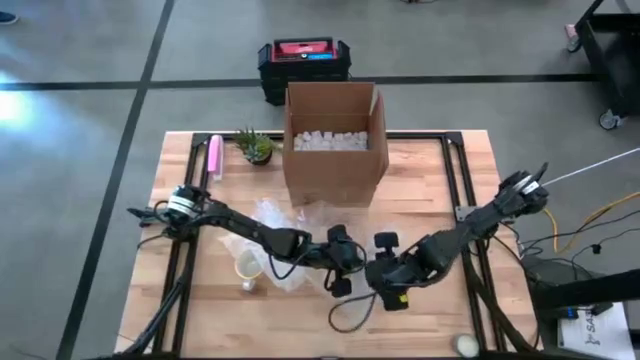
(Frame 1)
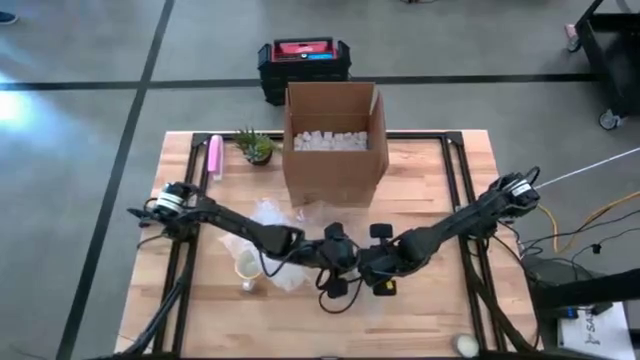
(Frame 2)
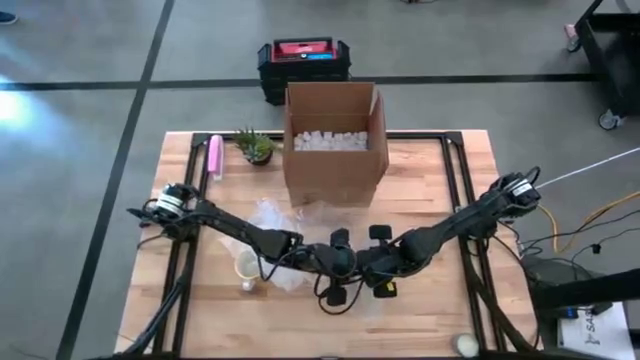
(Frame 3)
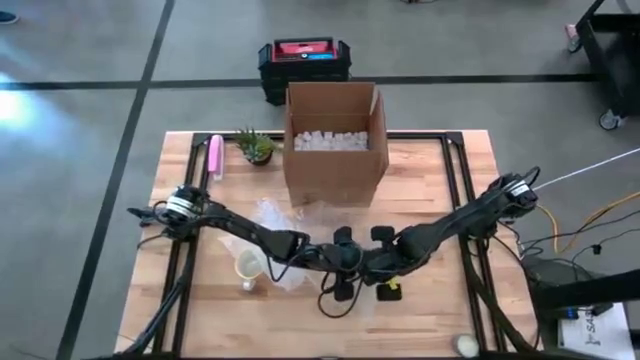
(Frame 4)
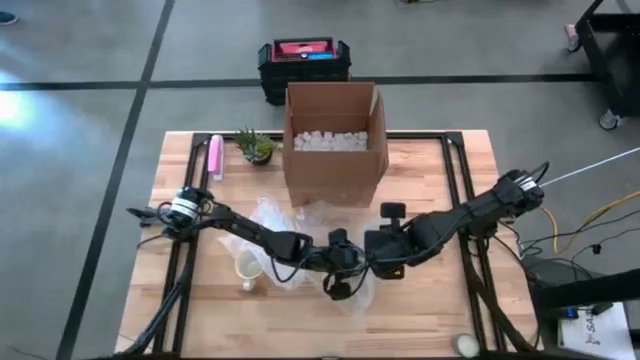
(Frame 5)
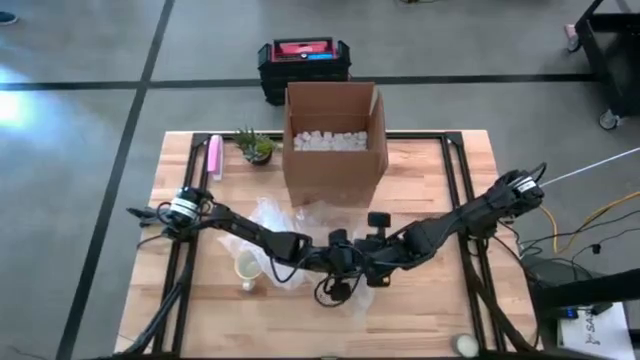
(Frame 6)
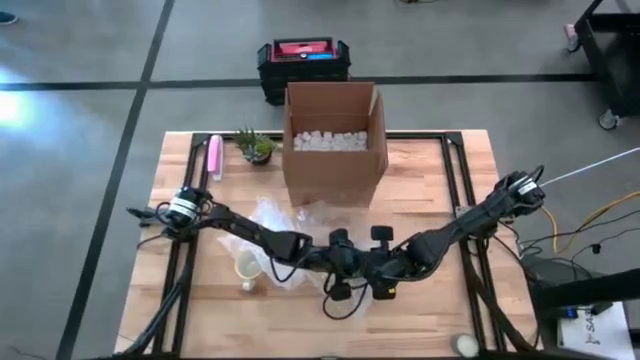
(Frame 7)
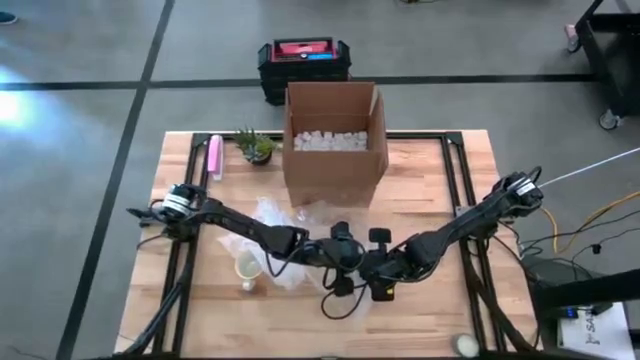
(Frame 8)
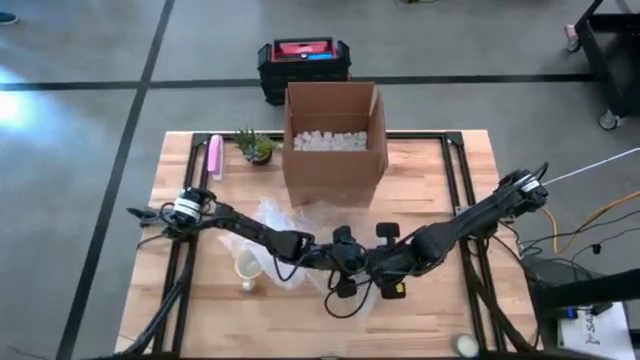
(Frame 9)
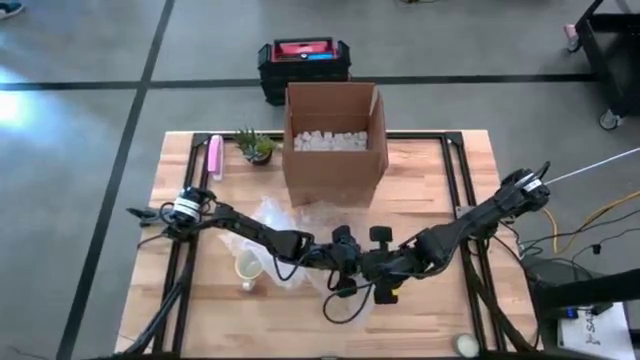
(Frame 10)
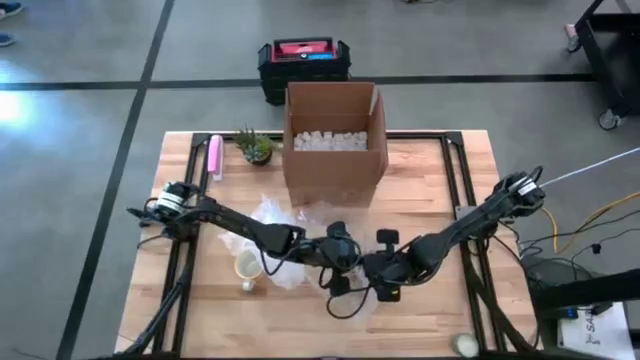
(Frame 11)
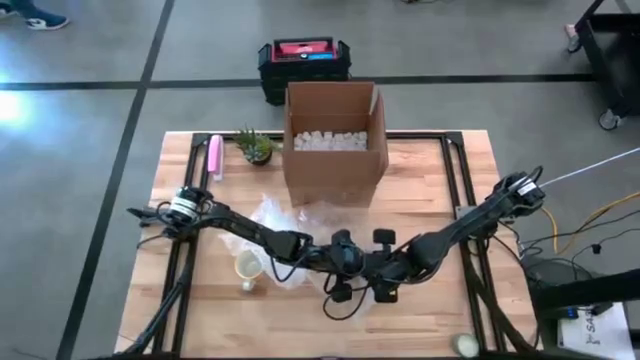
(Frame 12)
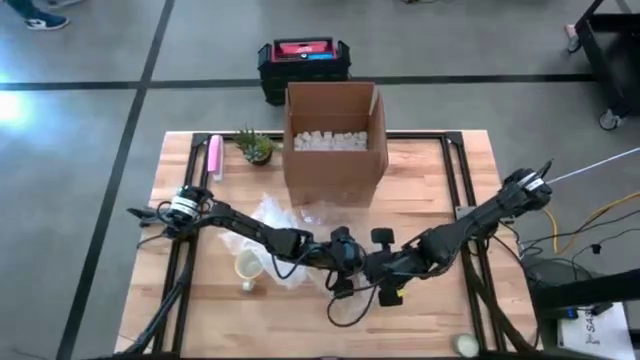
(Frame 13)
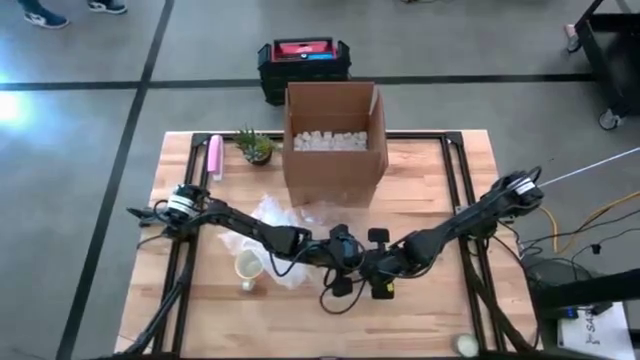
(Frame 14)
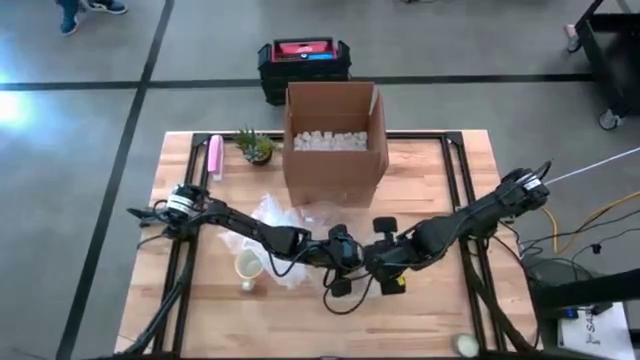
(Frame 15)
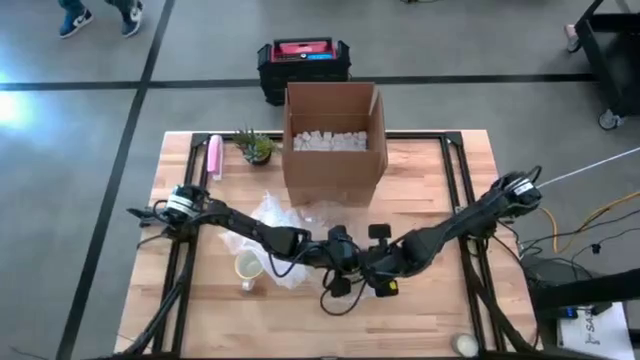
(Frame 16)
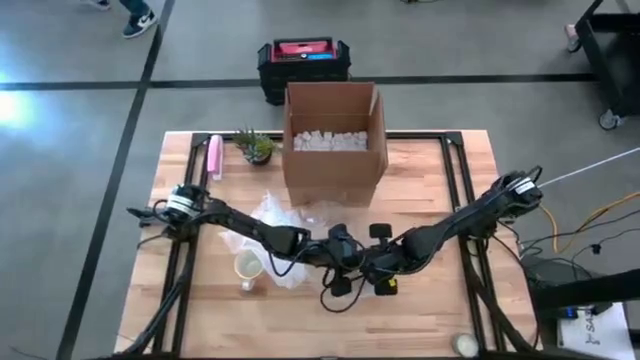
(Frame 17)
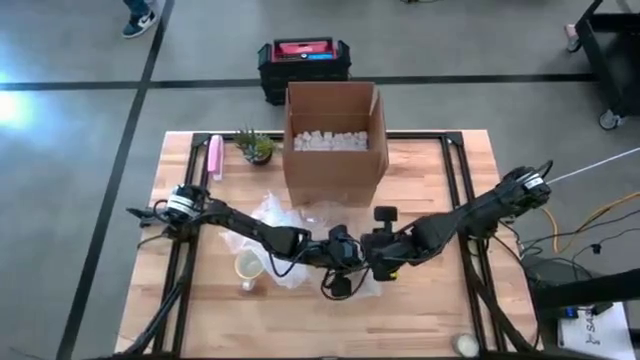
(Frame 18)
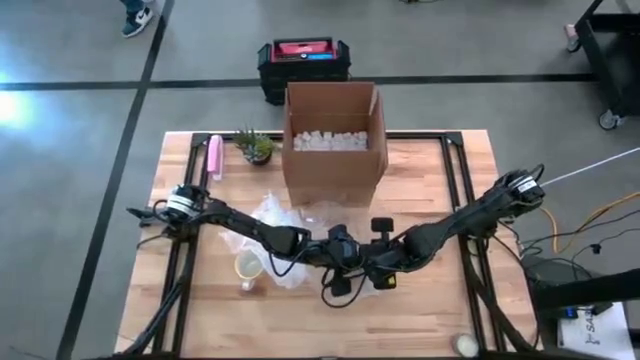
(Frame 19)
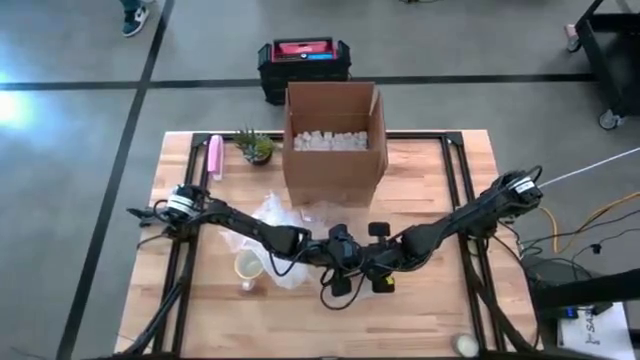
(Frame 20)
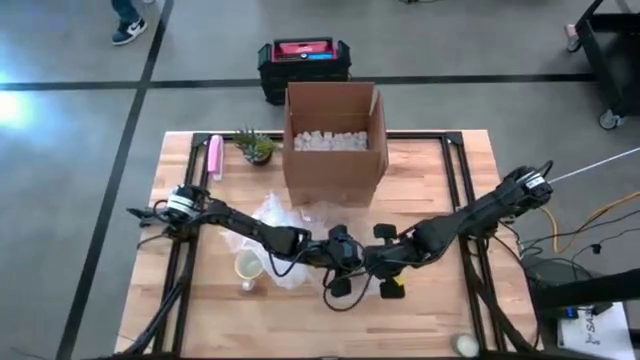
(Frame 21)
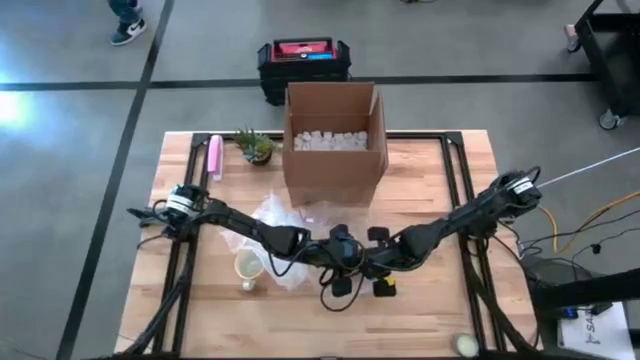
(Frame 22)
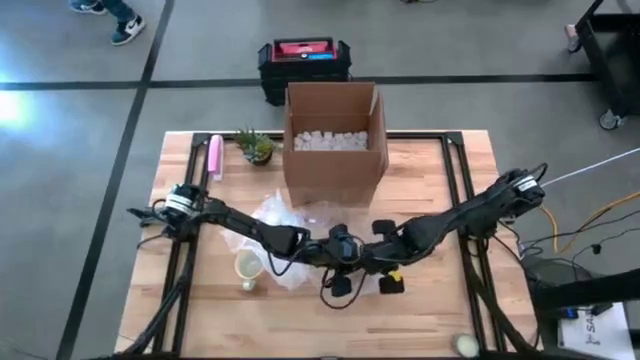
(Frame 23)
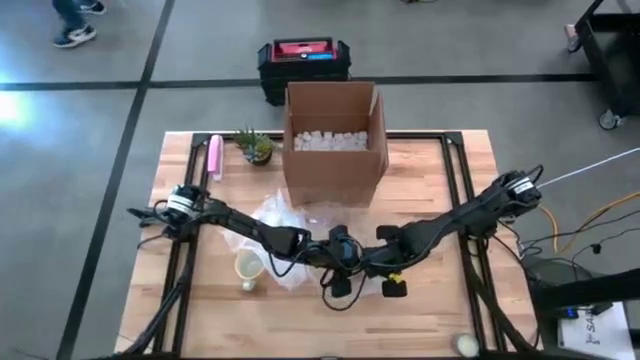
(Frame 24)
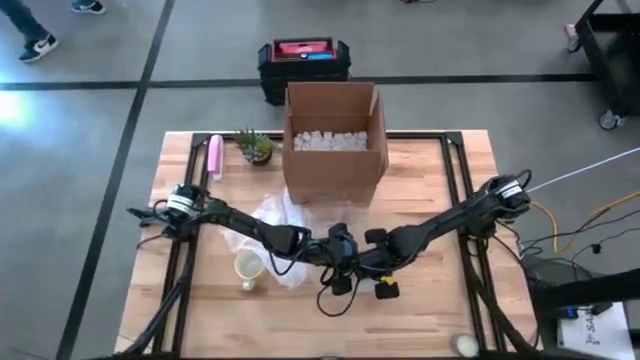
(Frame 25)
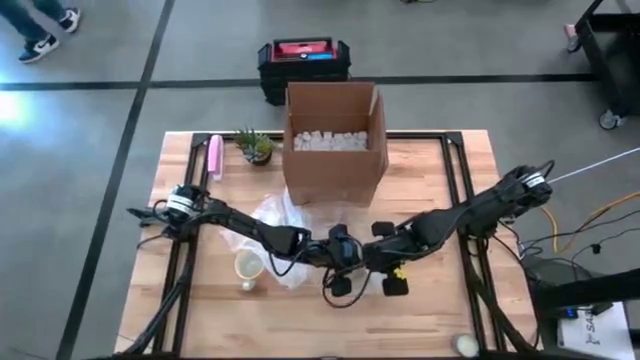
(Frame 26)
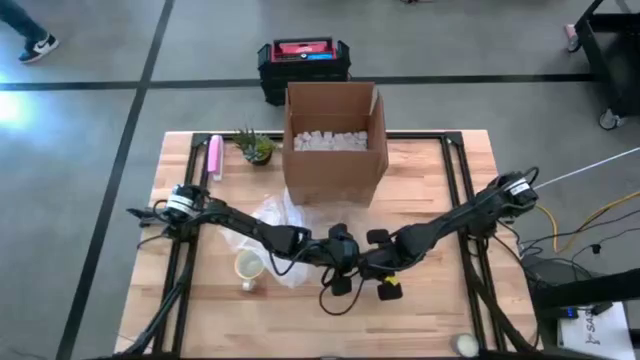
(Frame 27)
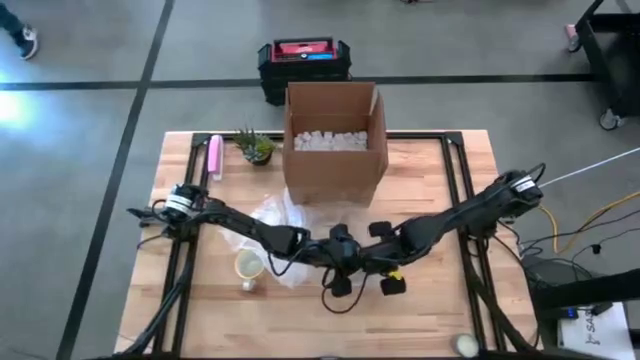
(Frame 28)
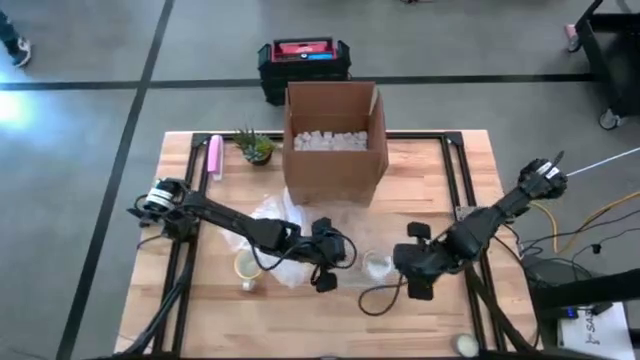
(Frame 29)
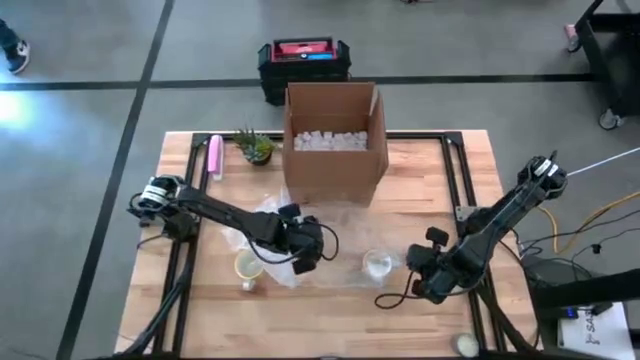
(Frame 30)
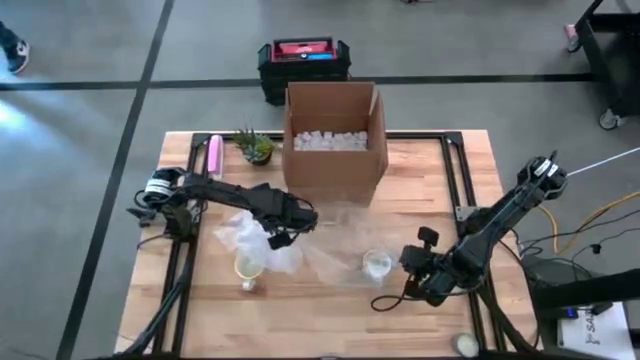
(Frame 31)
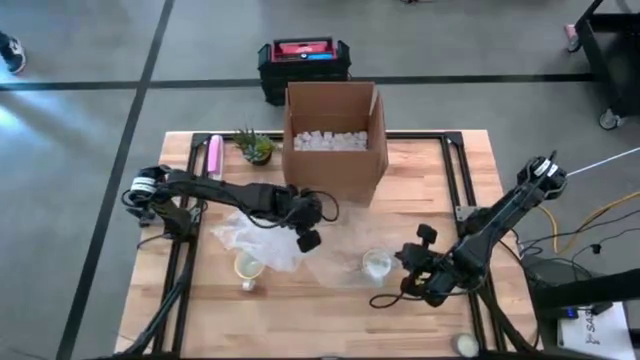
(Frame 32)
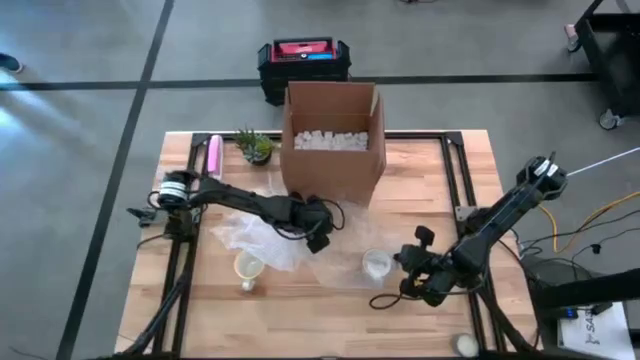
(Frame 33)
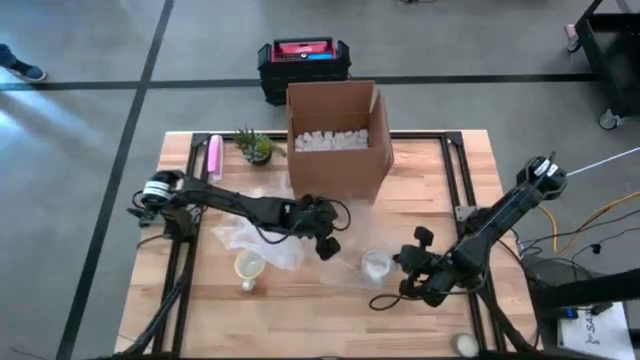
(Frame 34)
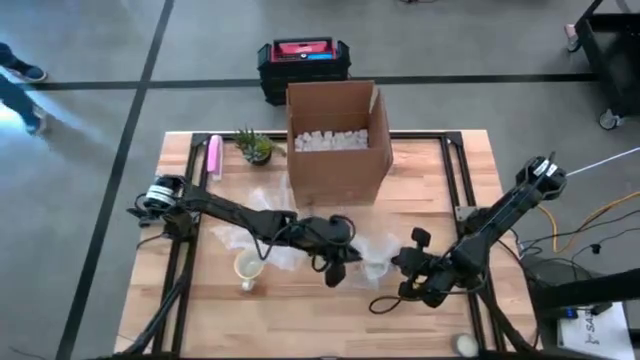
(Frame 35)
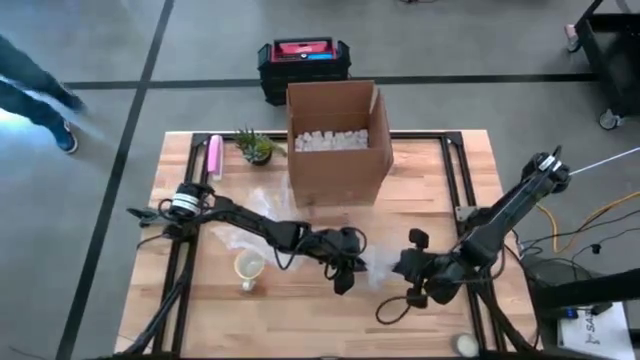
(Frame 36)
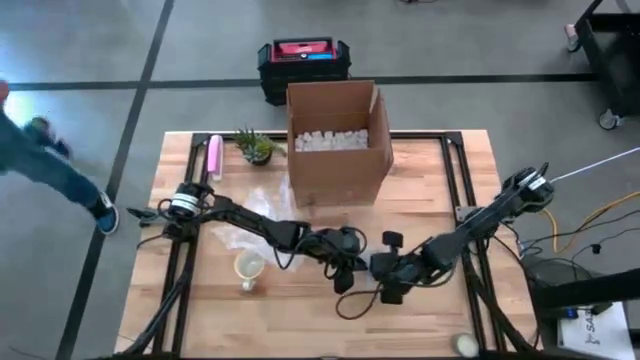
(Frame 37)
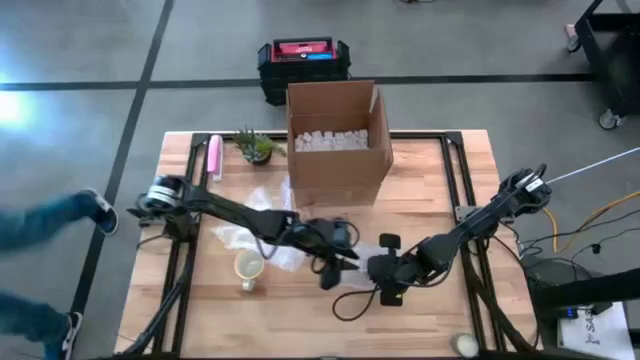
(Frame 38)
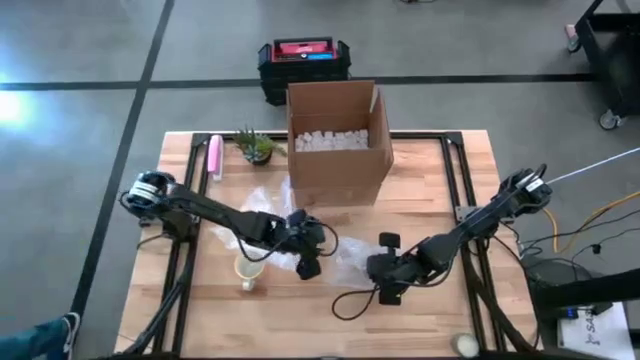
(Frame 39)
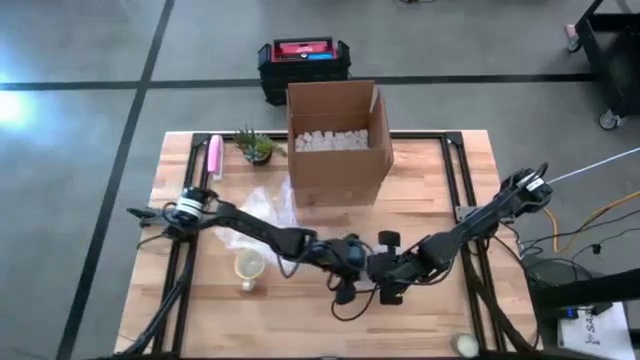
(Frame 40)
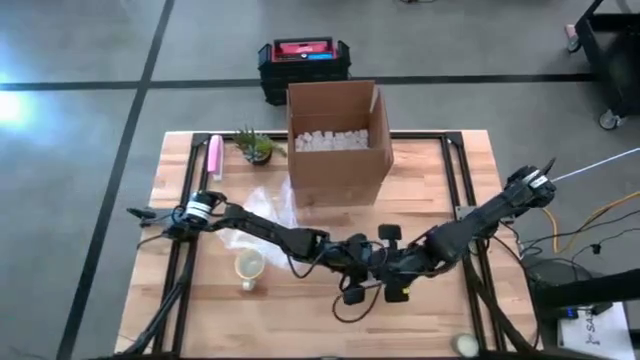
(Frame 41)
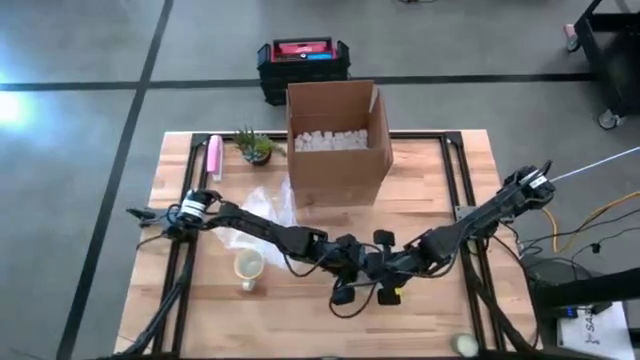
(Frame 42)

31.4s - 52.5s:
Task: wrap mug
Wrap the gray patterned mug using the right bubble wrap
